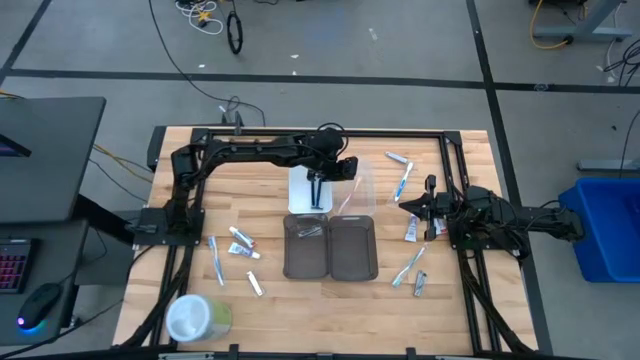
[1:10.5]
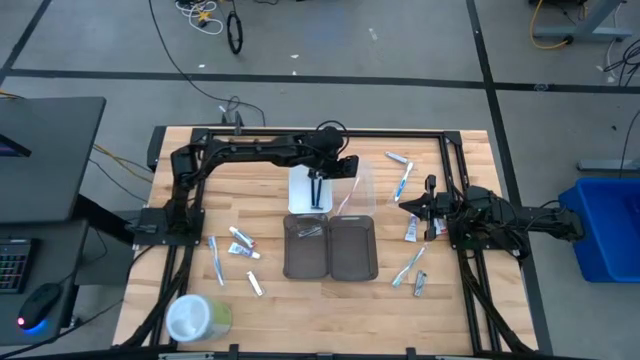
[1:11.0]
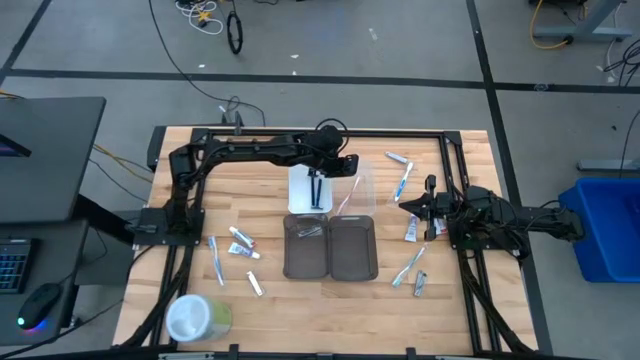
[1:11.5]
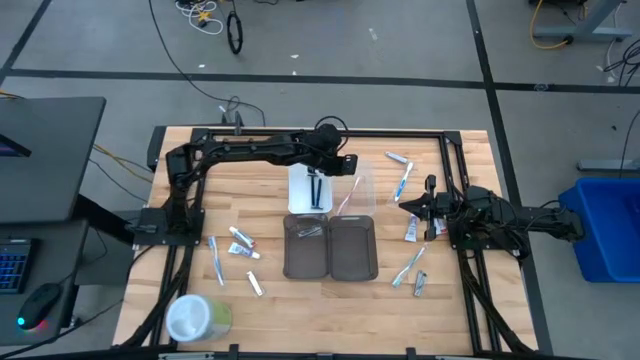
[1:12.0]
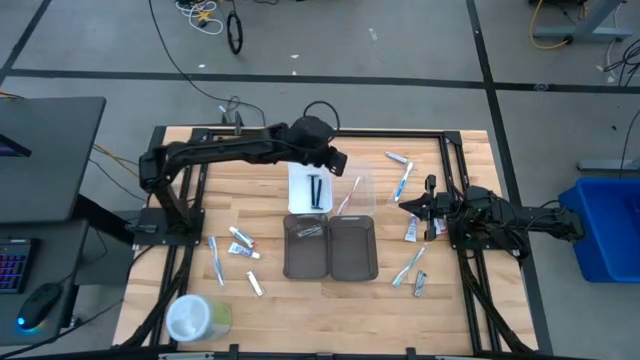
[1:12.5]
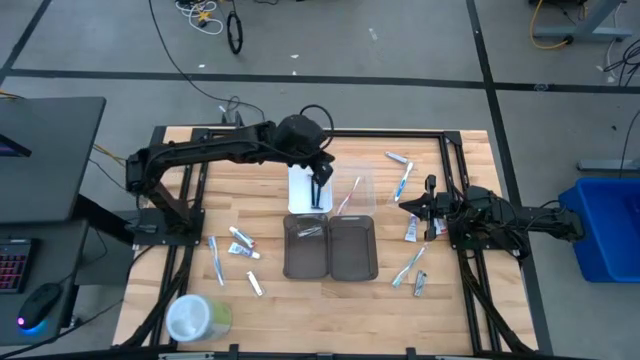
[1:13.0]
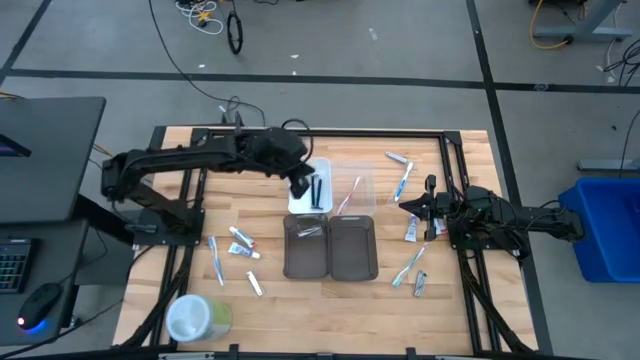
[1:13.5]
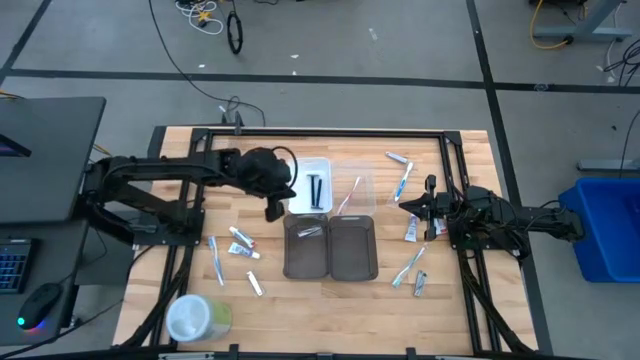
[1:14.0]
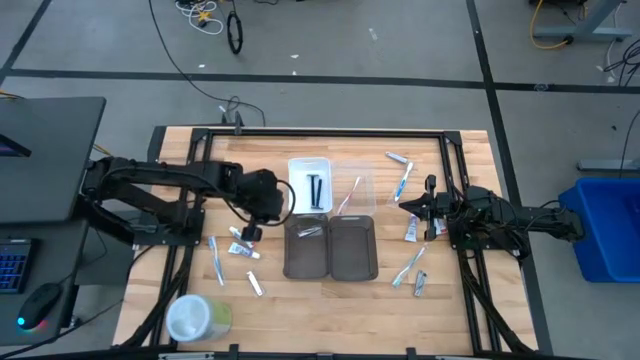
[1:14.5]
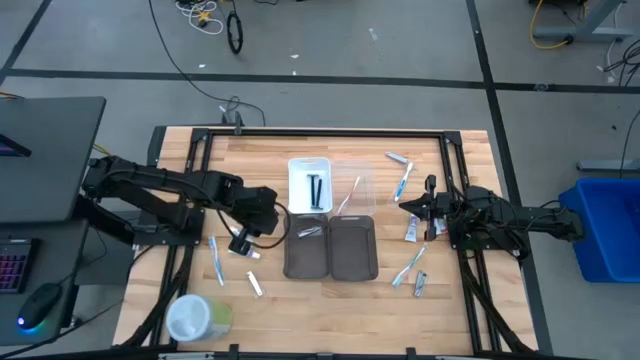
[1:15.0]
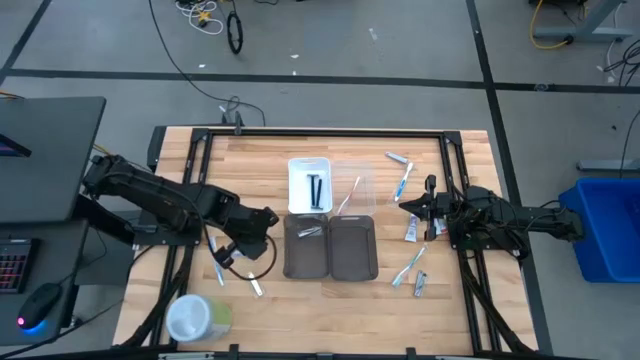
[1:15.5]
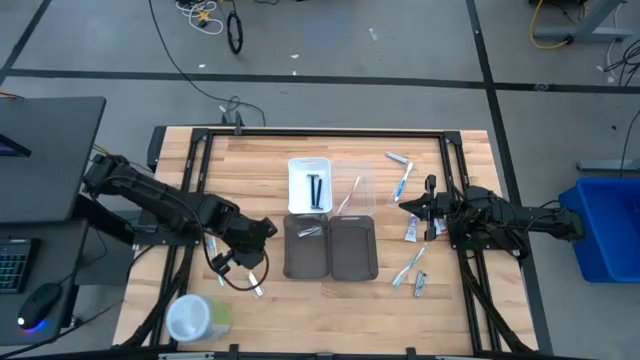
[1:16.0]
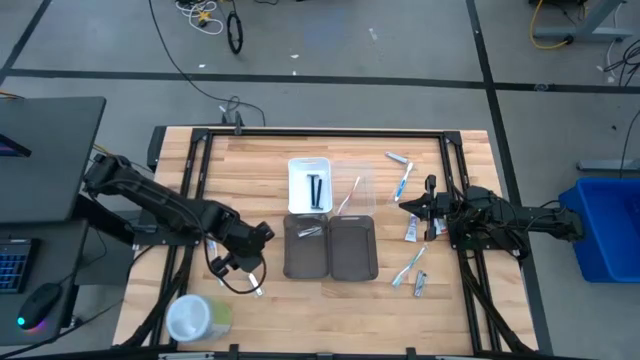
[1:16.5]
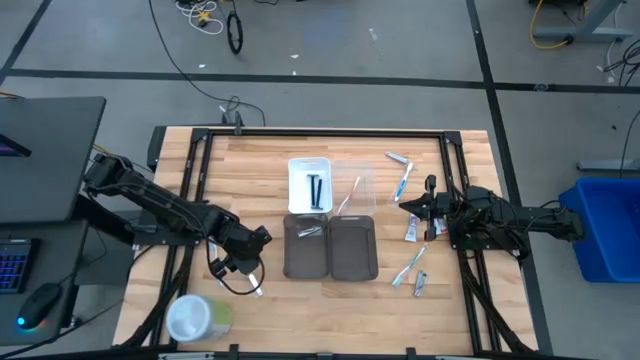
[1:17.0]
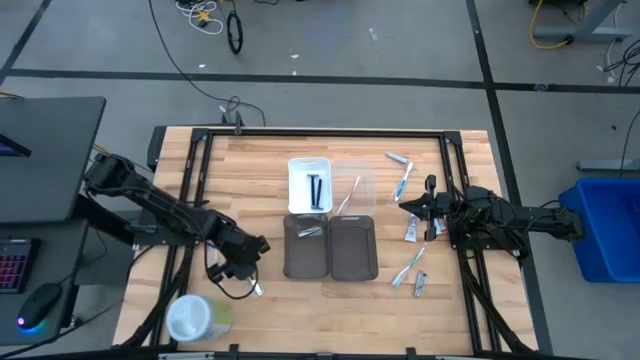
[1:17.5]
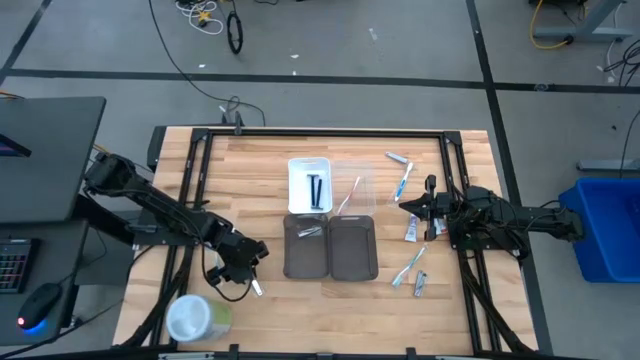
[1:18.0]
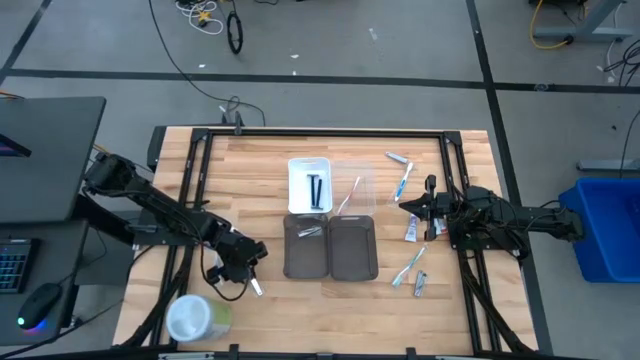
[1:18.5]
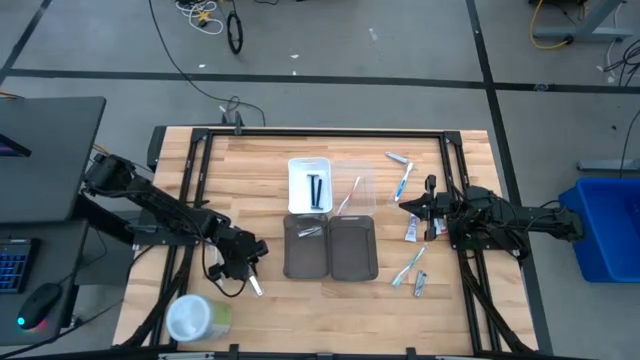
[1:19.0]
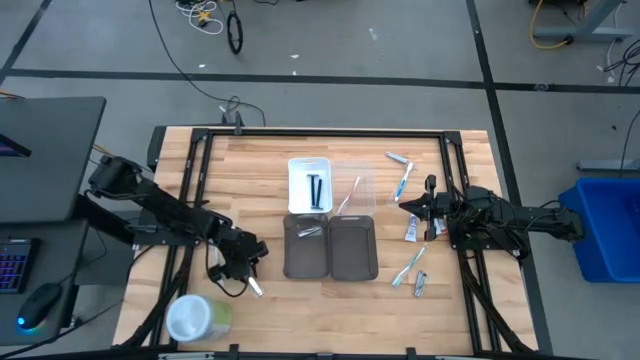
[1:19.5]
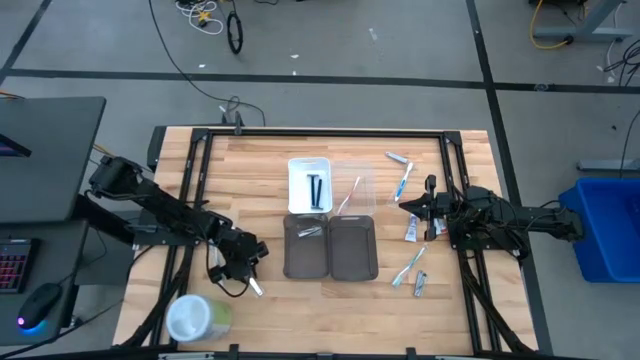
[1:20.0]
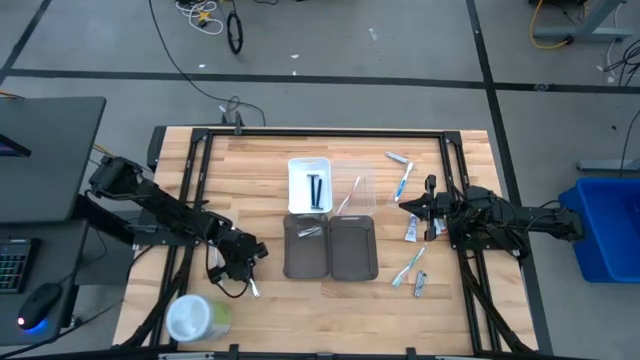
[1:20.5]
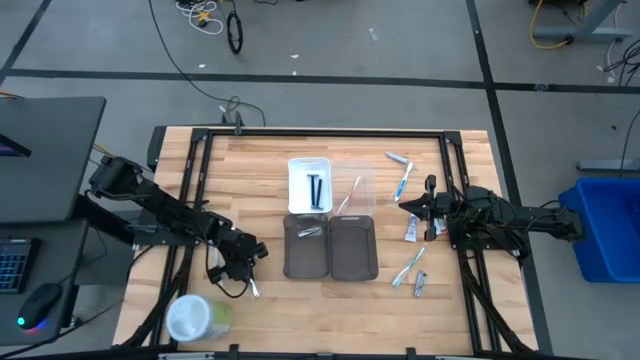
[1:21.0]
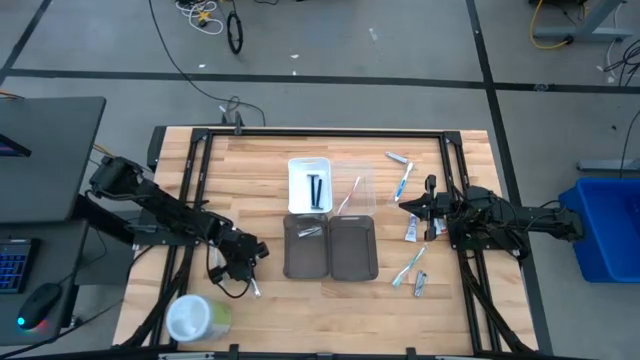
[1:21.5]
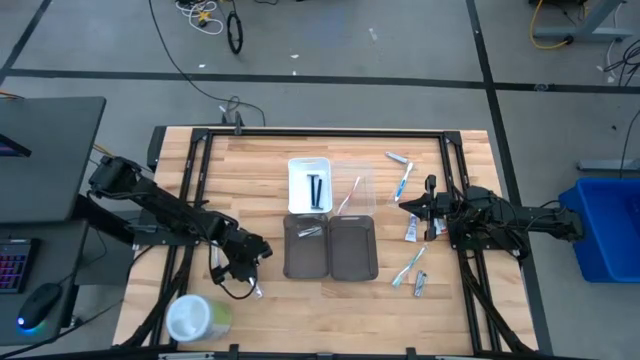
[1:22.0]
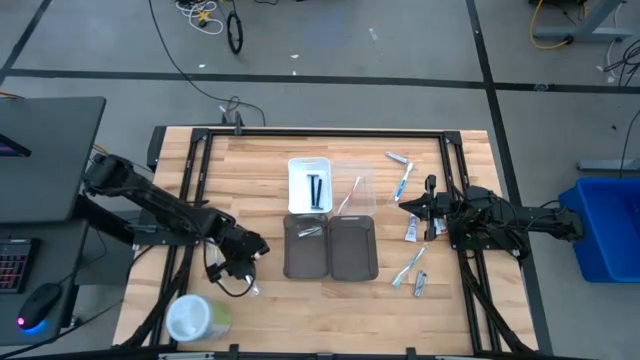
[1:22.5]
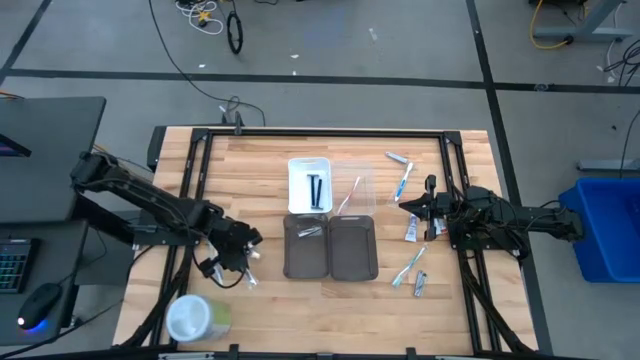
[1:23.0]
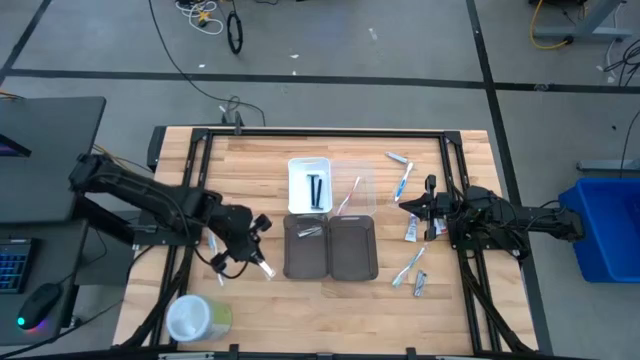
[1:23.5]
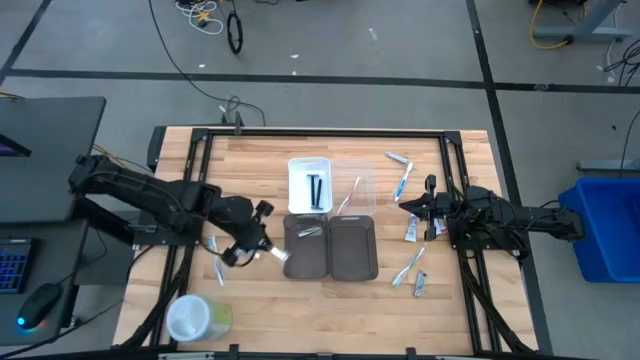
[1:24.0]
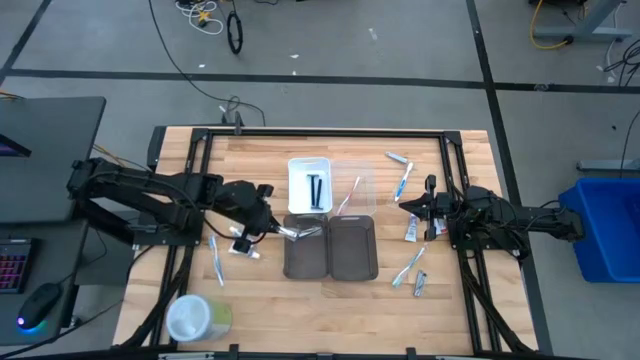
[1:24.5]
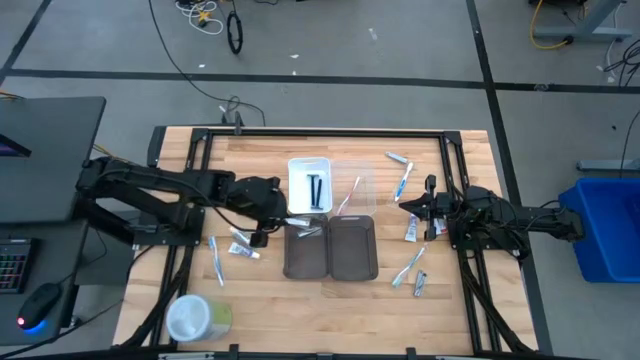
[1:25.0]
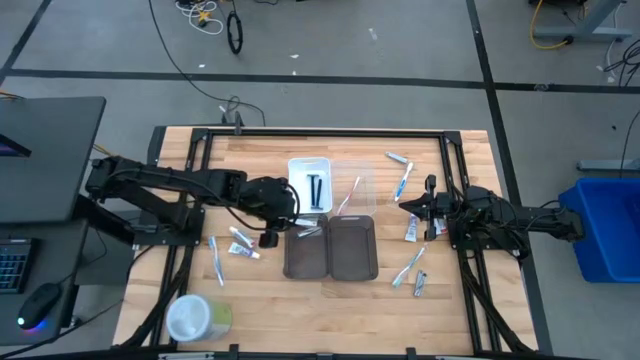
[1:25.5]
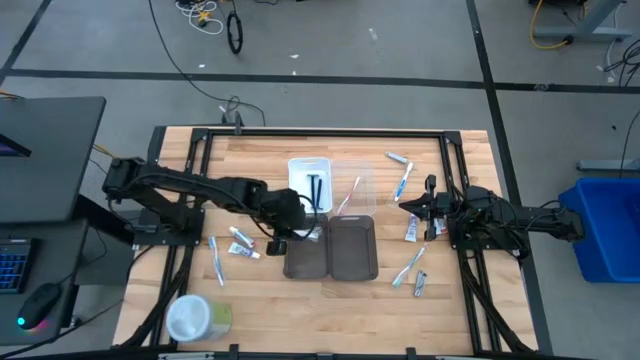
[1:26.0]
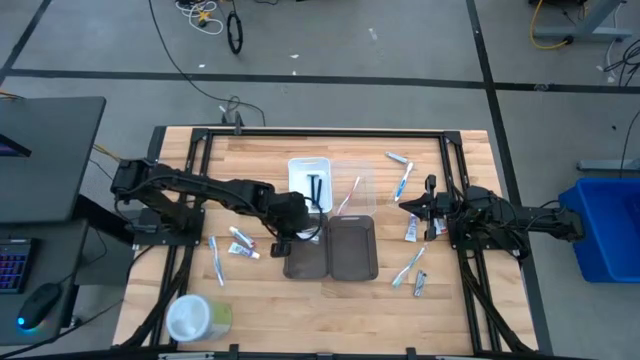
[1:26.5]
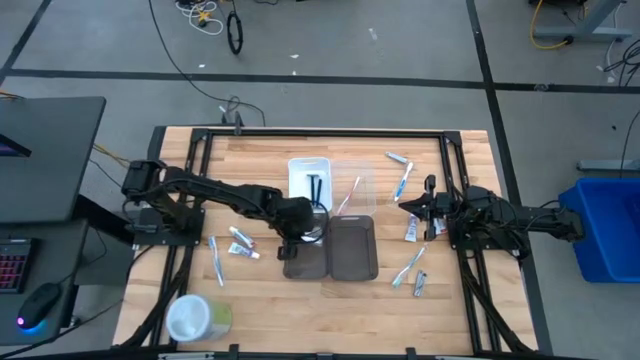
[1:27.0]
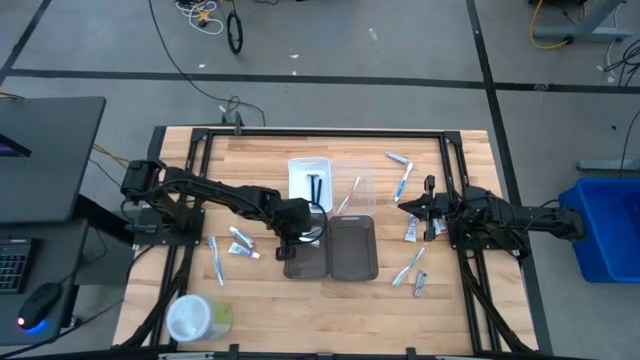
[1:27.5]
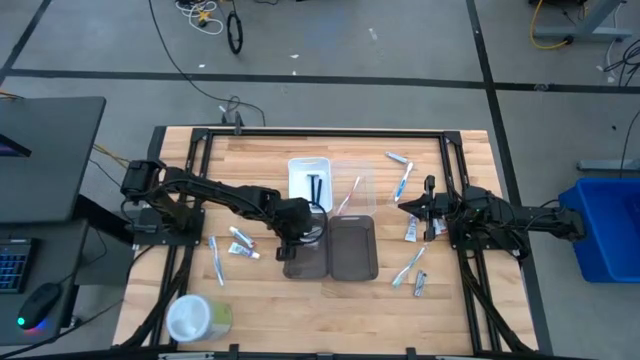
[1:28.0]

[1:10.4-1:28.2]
Task: Pick & Place Travel size toiletries
Put the silver nail cutter into the left black bin

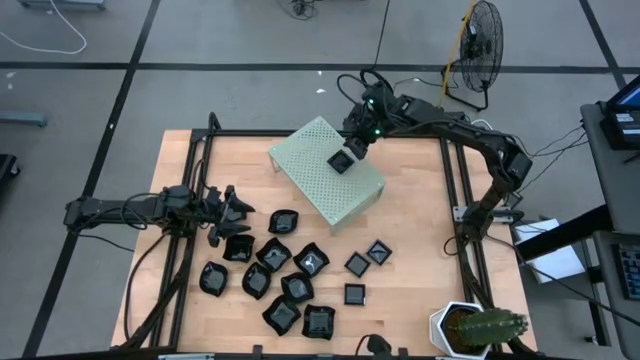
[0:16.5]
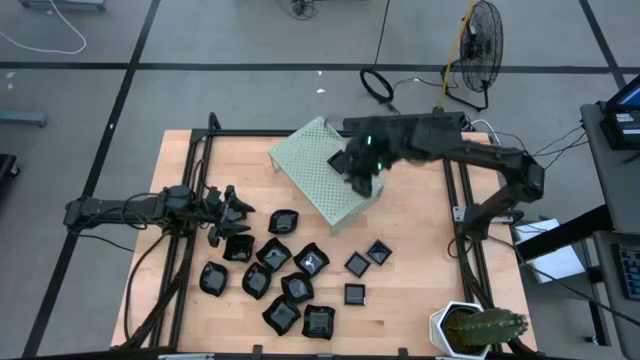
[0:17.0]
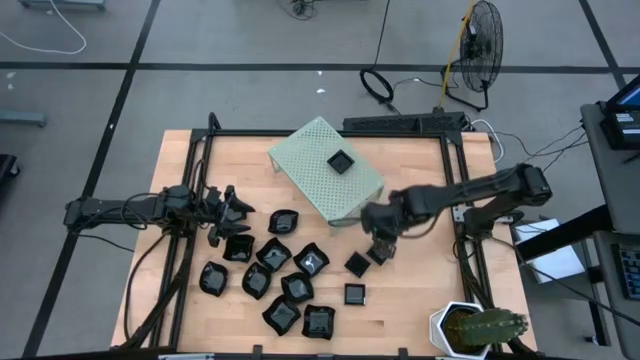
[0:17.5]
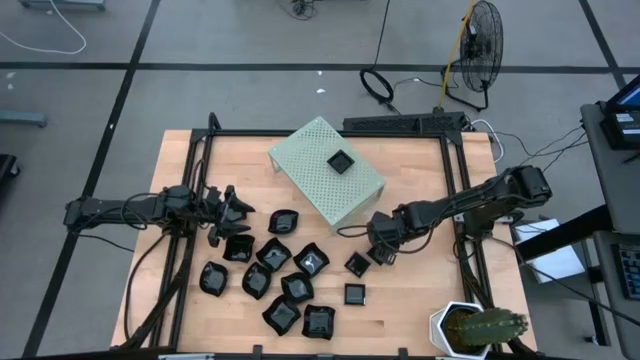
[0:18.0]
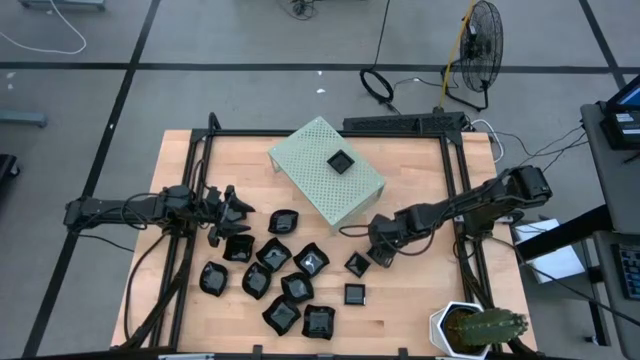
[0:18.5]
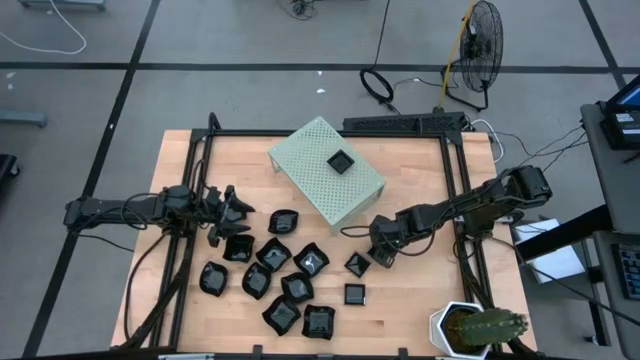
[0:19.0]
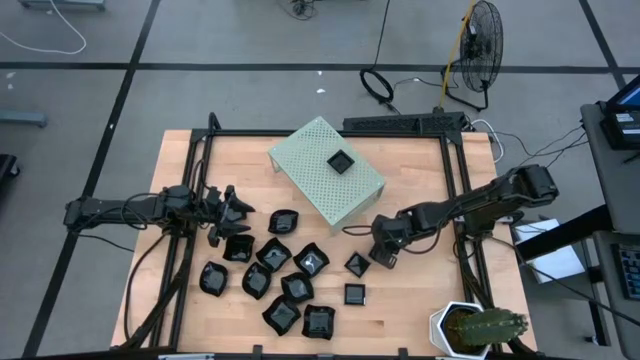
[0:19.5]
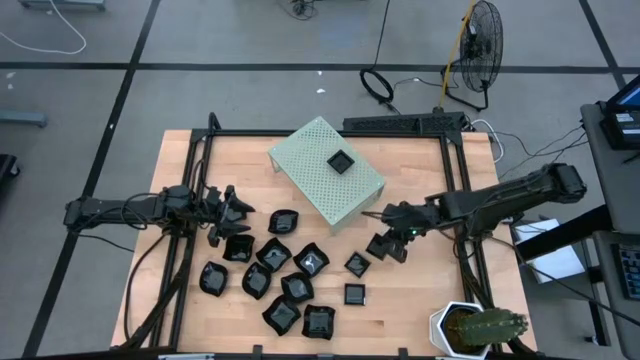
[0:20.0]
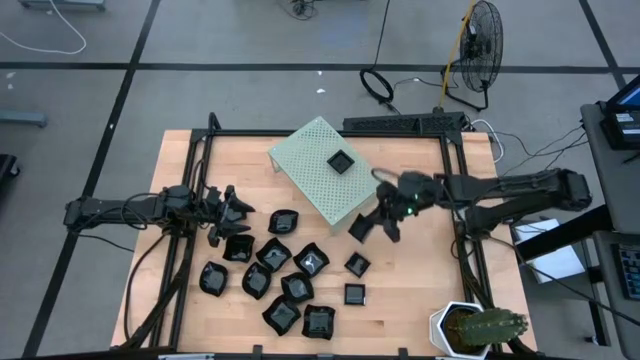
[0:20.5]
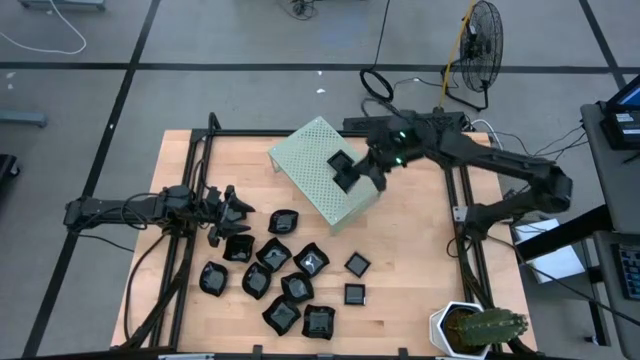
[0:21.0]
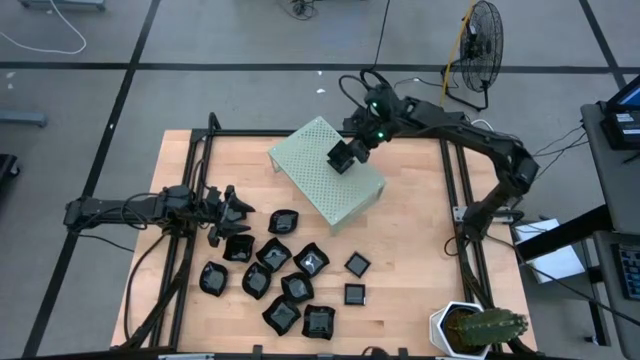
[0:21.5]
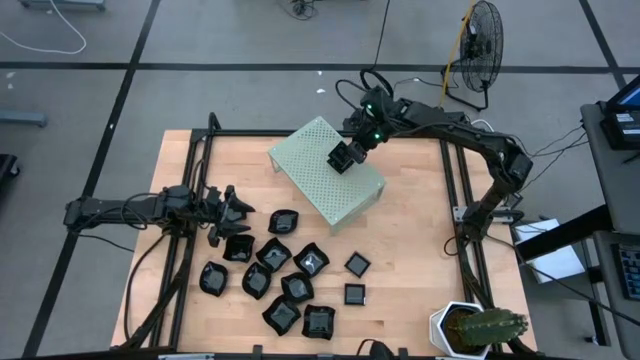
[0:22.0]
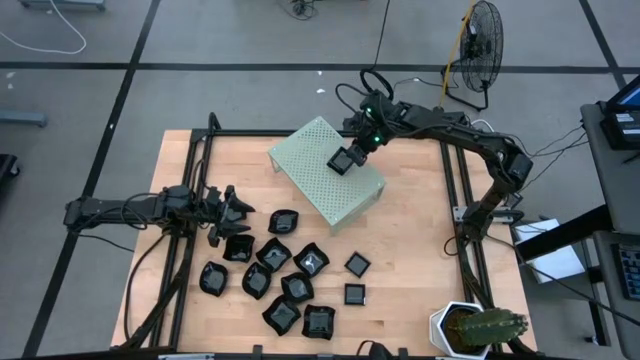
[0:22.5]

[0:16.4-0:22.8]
Task: Pick & Place Mini shaped plates
Stack the square plate on top of the other square plate on the shelf
